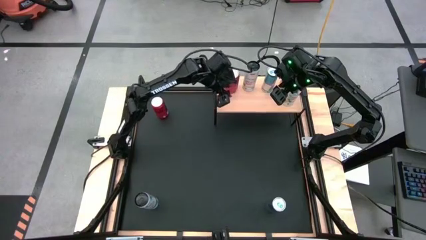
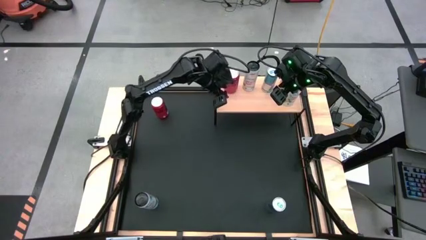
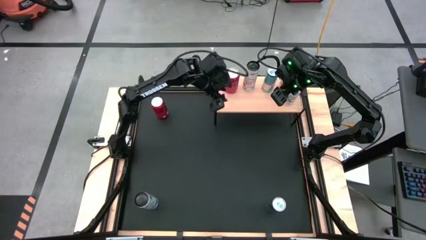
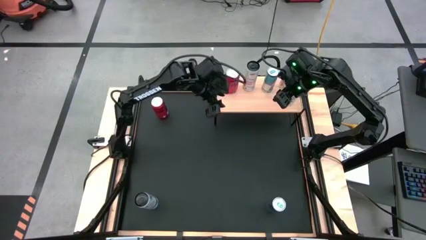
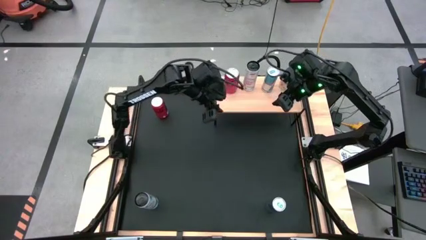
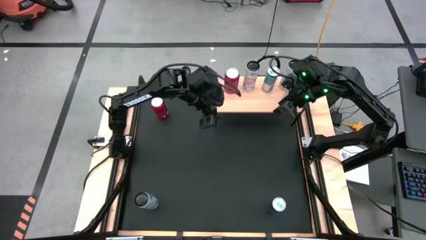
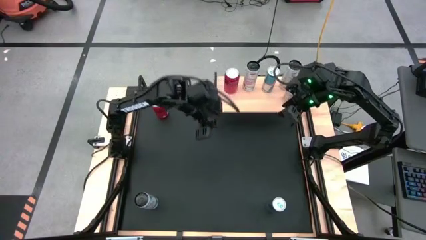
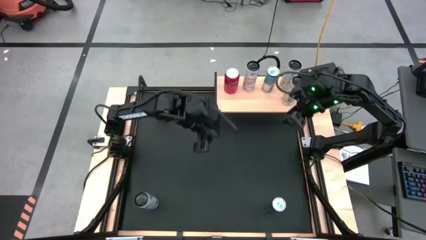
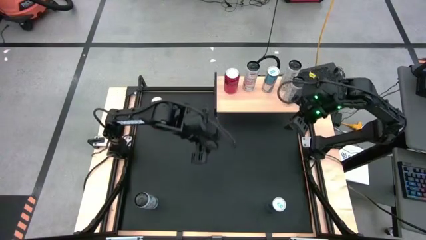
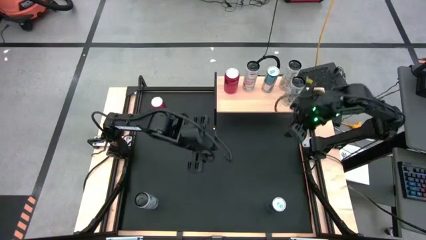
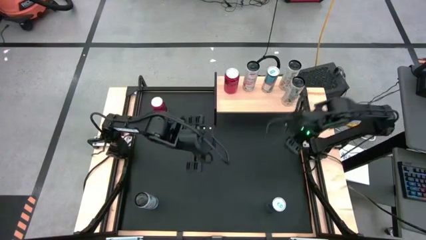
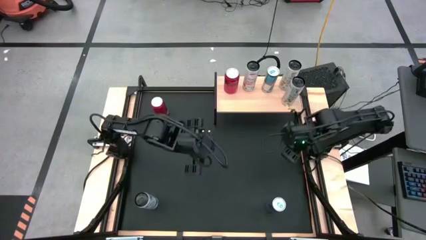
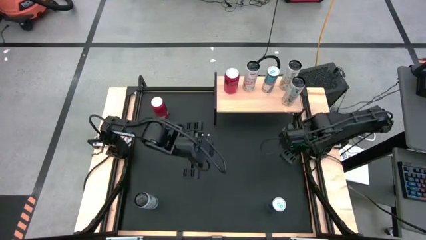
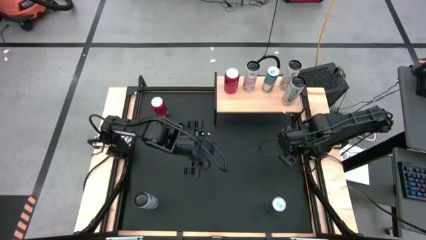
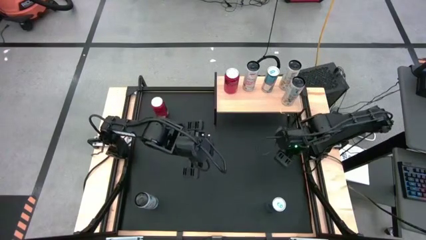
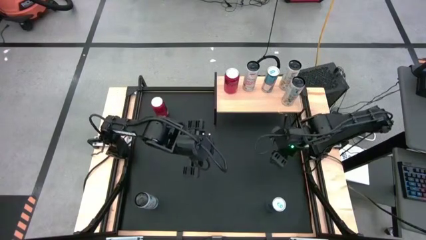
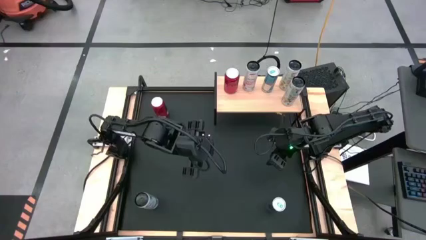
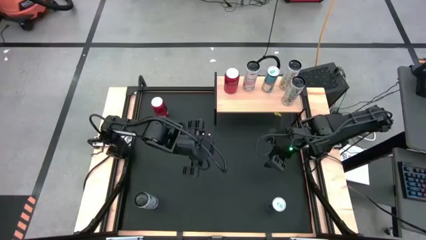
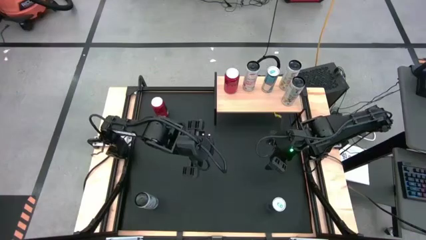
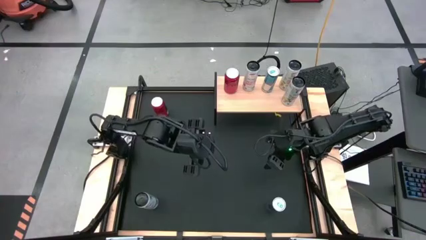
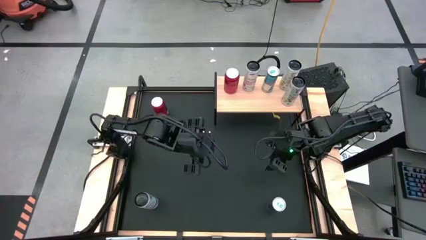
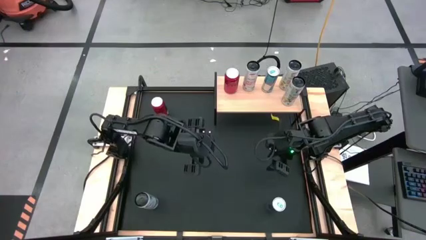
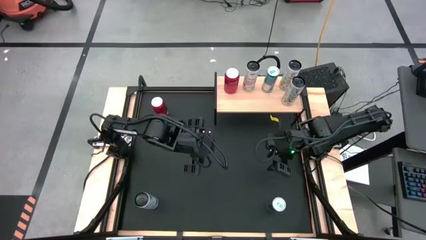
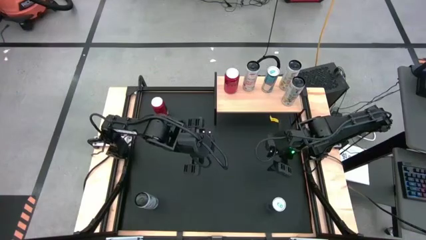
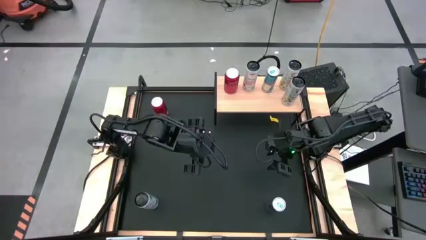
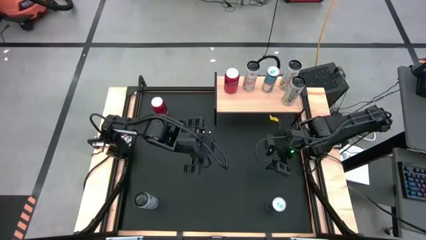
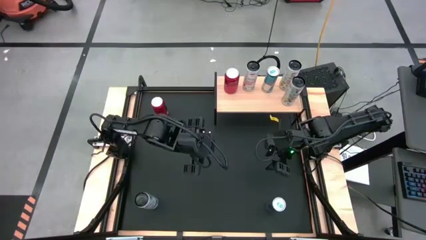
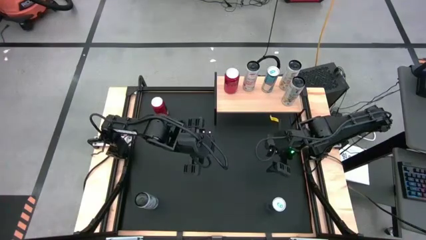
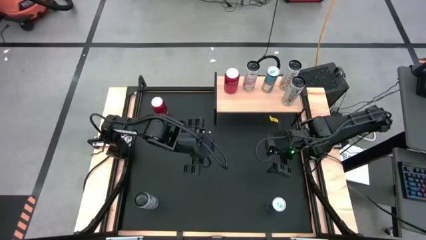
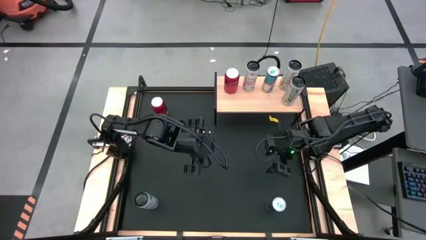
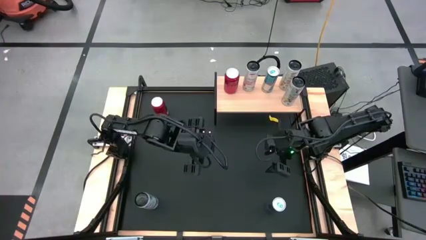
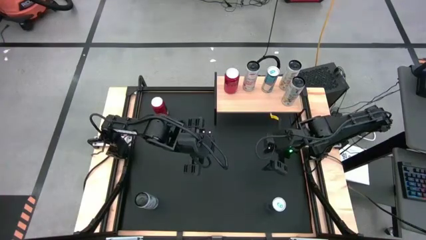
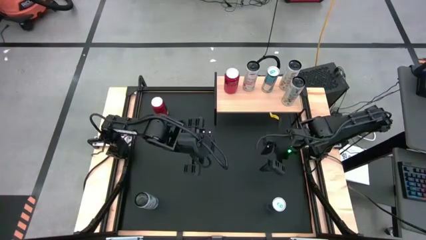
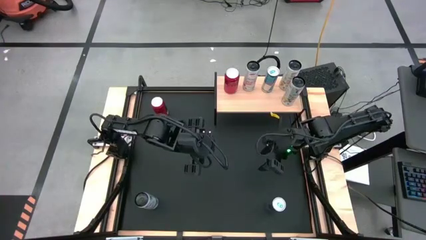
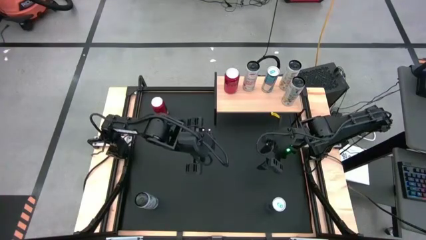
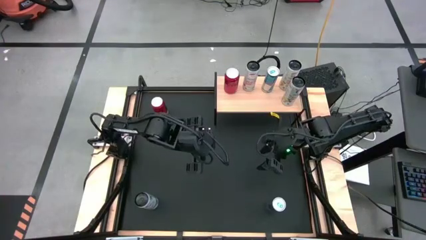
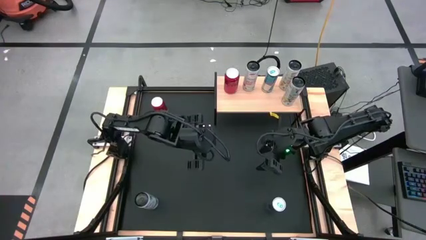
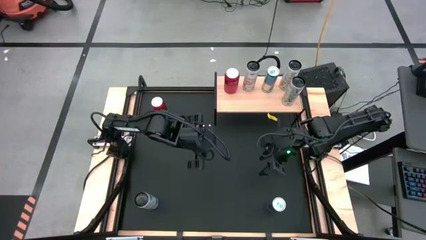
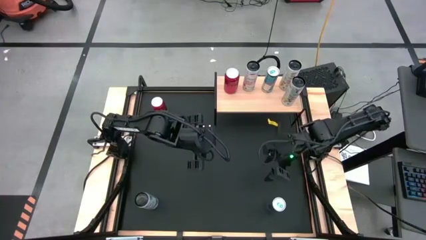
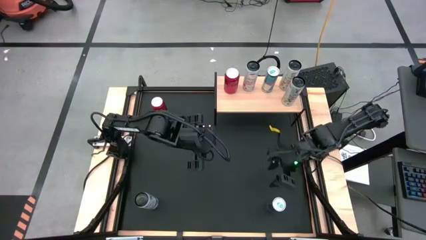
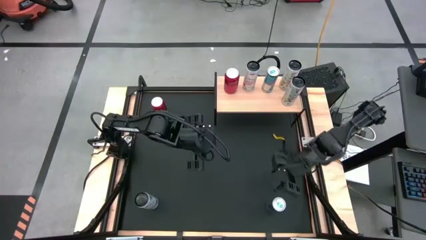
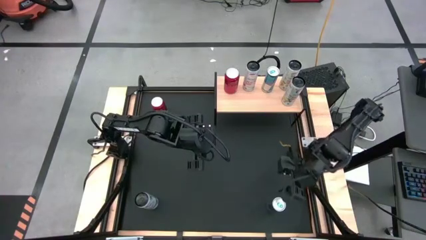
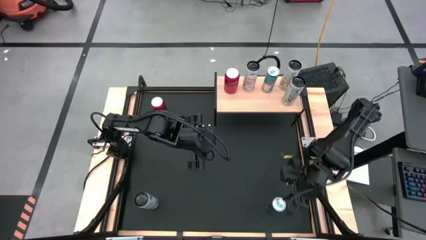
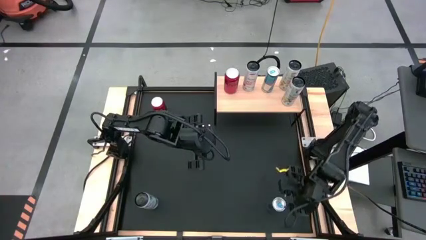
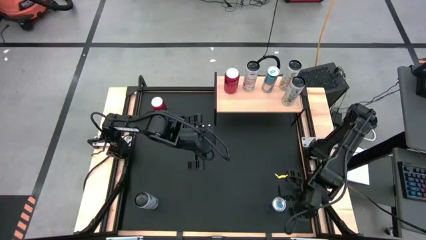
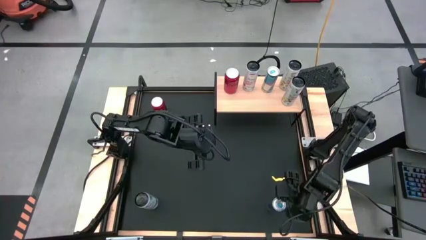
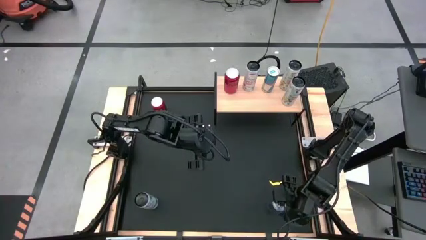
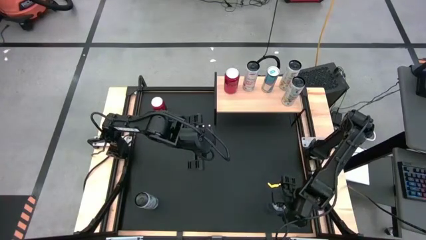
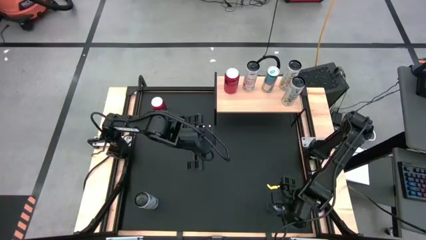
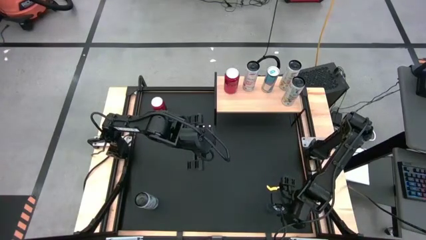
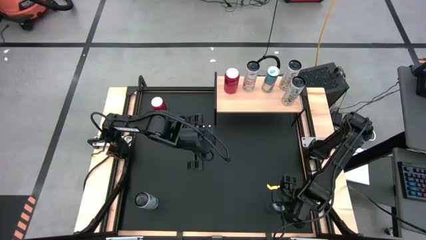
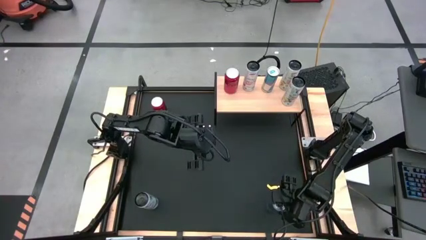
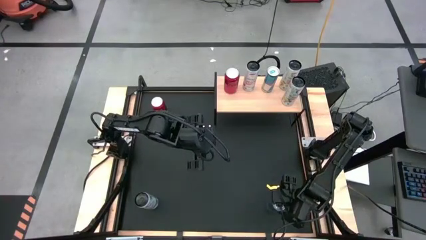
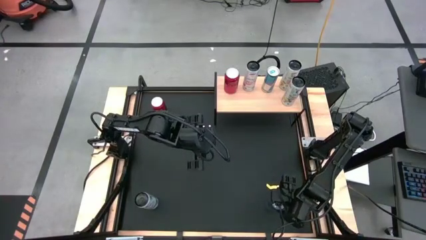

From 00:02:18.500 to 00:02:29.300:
Task: Place canned beverage on shelf
Put the blue soda can on the shelf aligned with the other blue soda can
